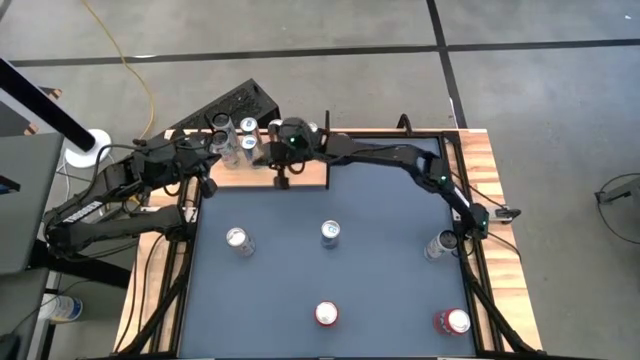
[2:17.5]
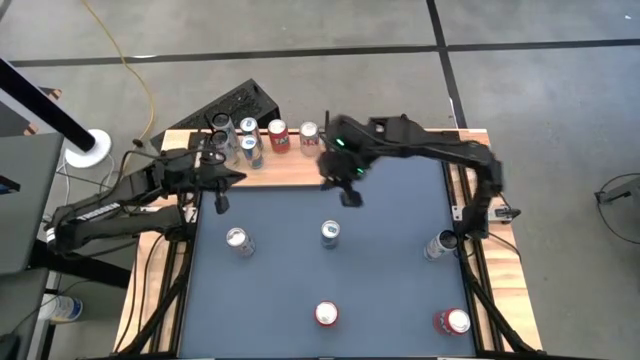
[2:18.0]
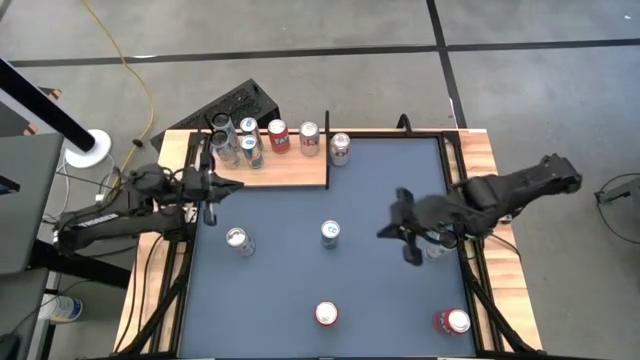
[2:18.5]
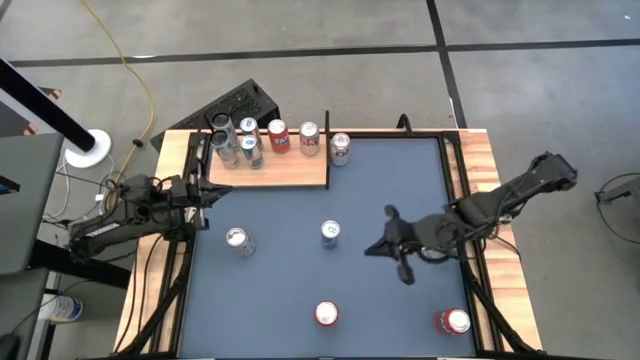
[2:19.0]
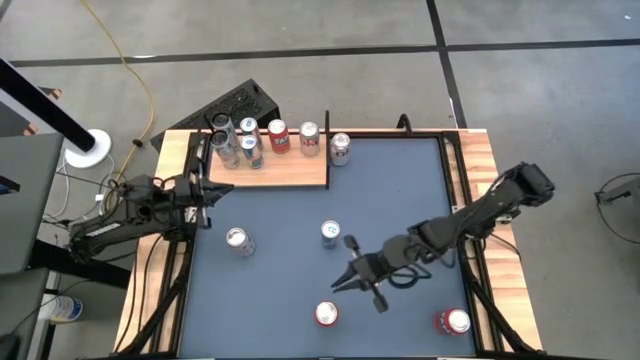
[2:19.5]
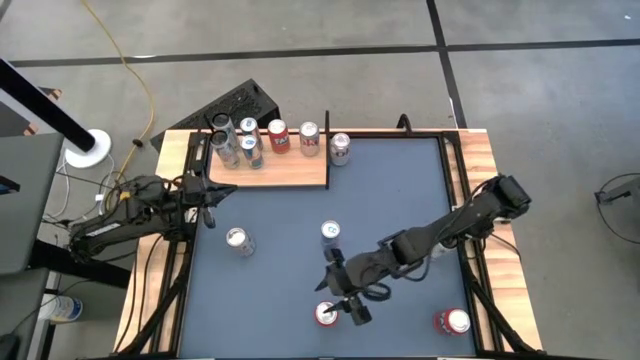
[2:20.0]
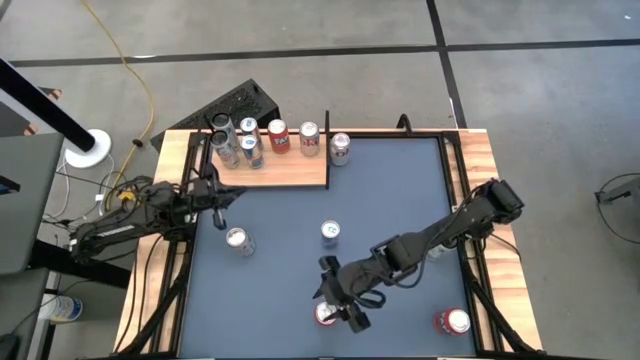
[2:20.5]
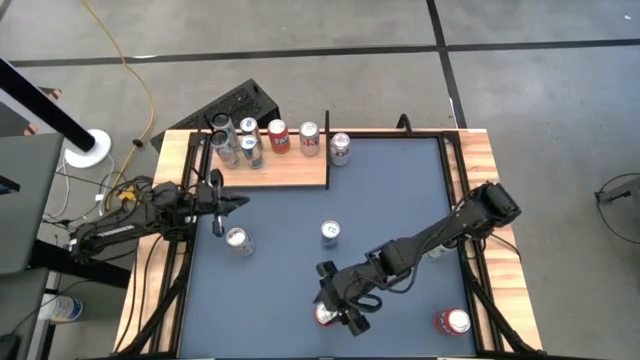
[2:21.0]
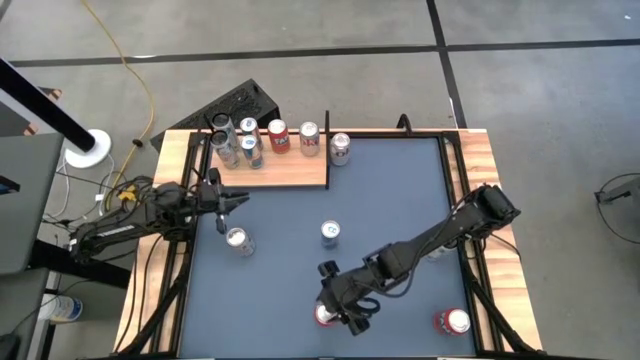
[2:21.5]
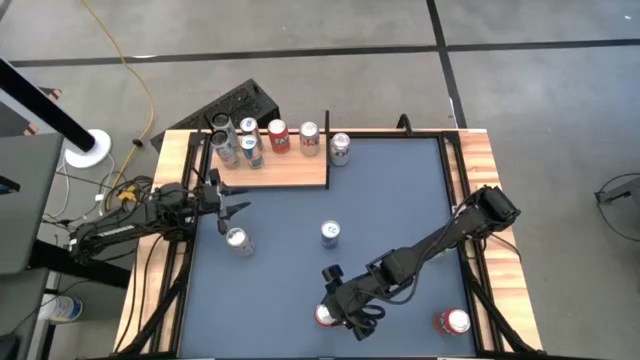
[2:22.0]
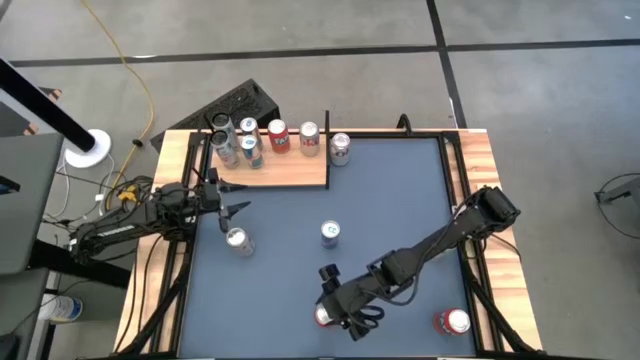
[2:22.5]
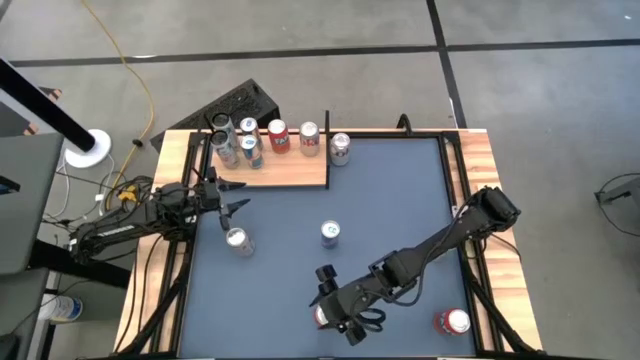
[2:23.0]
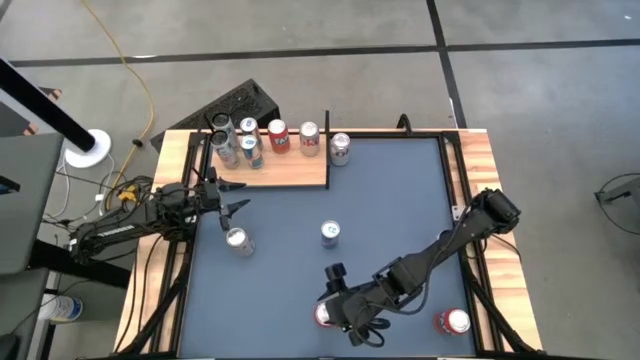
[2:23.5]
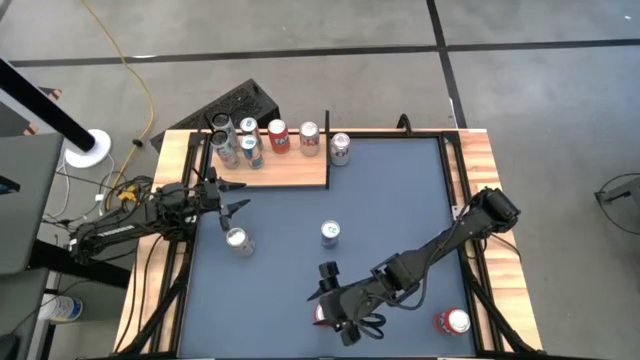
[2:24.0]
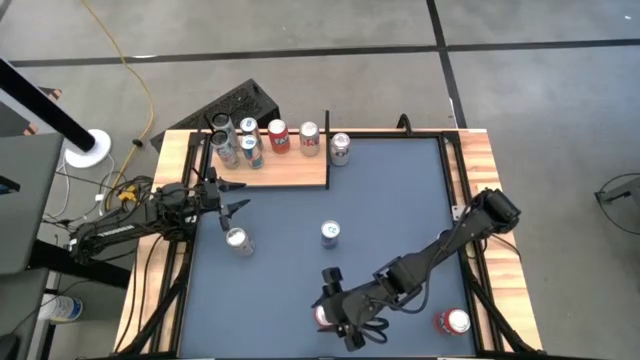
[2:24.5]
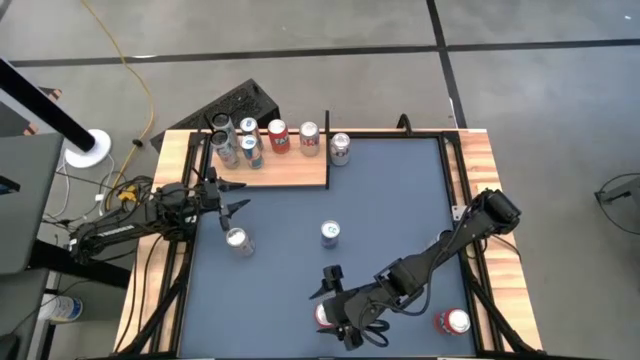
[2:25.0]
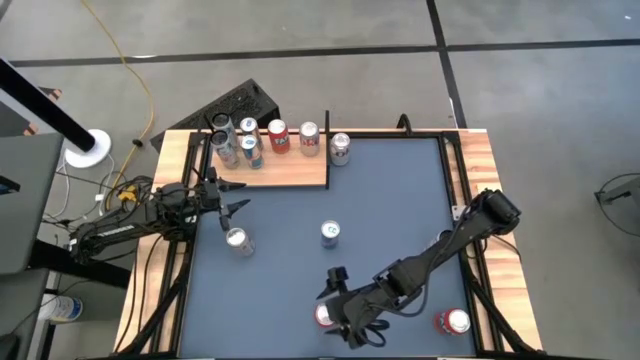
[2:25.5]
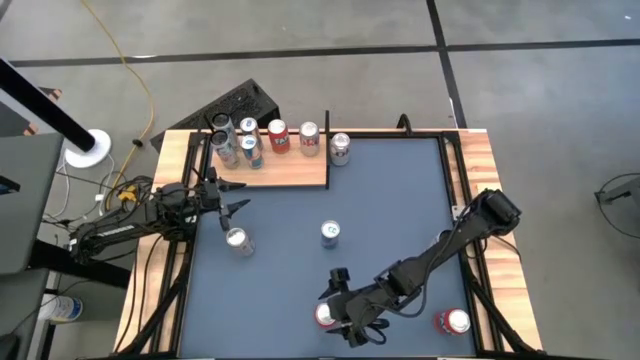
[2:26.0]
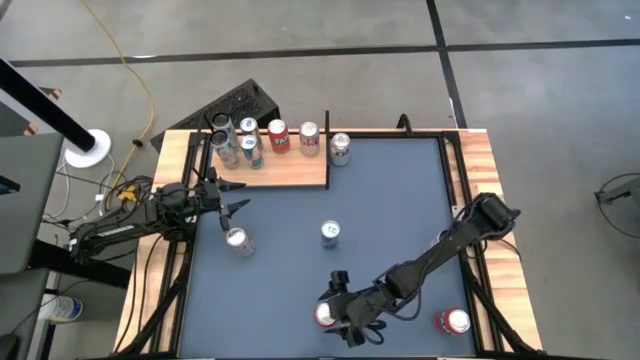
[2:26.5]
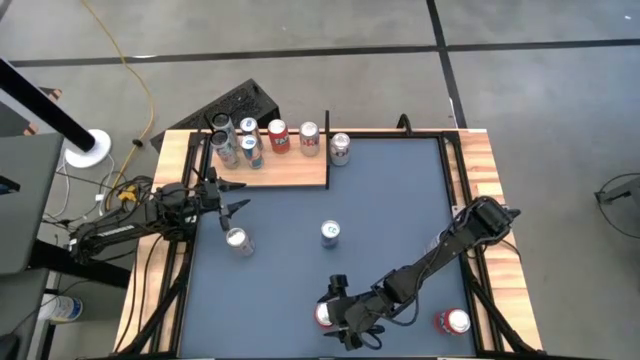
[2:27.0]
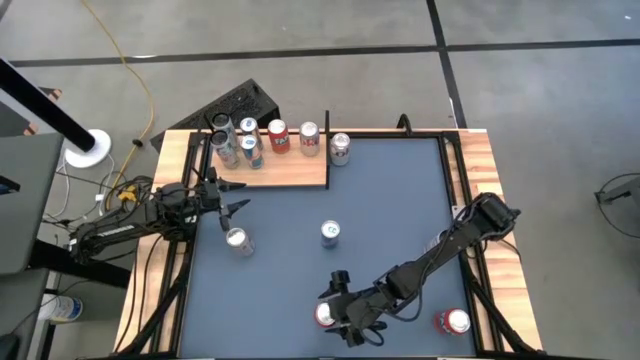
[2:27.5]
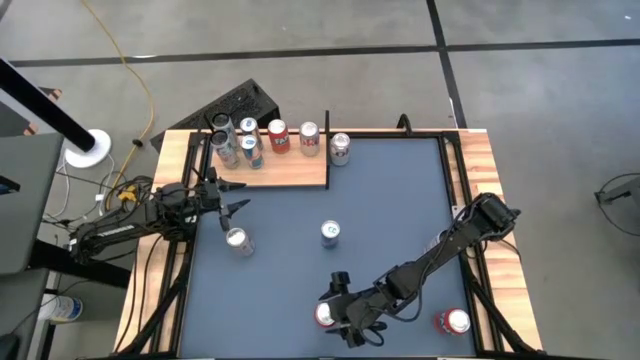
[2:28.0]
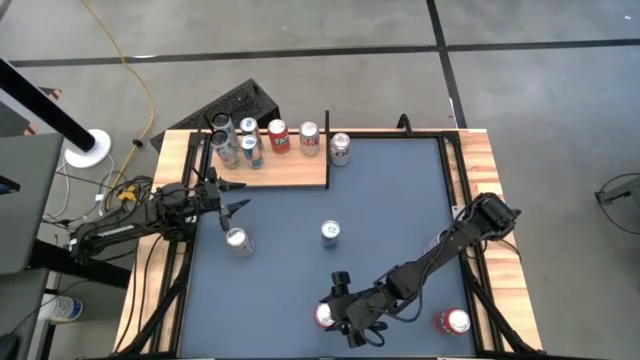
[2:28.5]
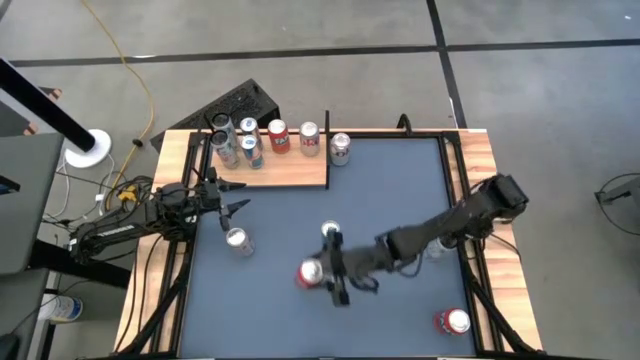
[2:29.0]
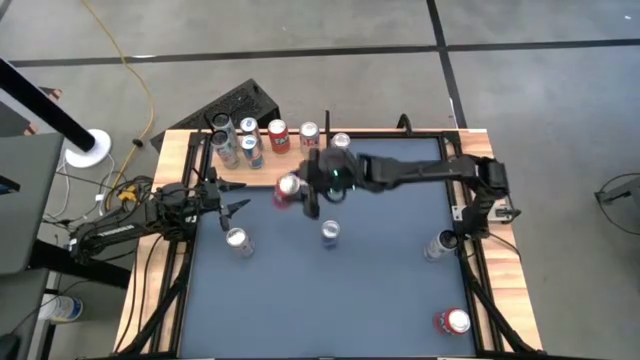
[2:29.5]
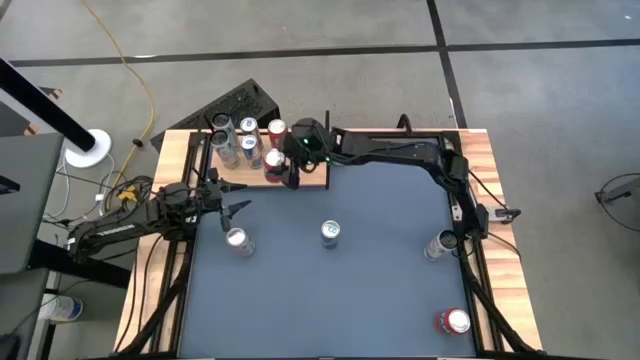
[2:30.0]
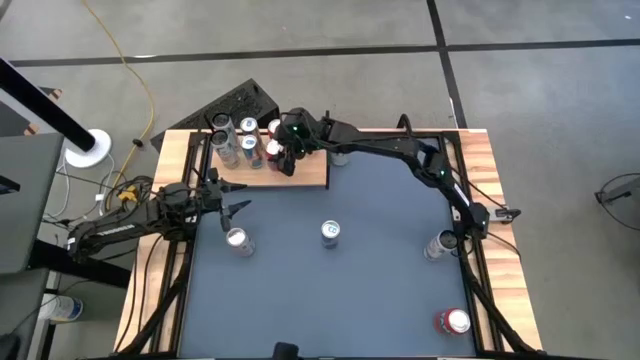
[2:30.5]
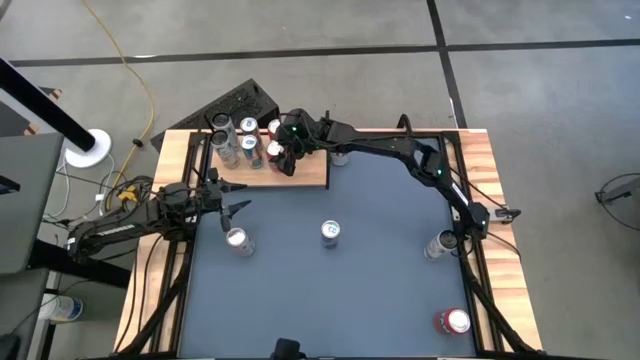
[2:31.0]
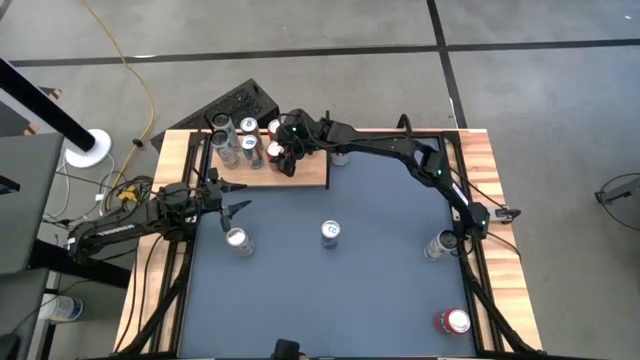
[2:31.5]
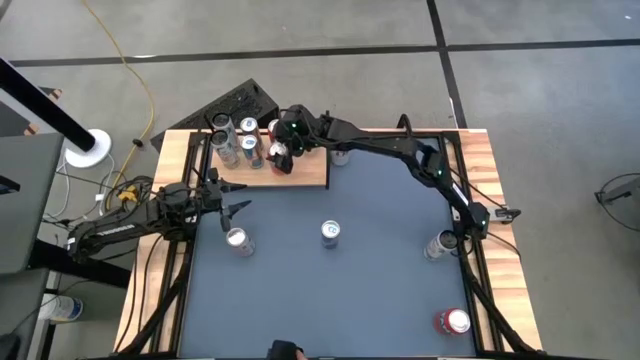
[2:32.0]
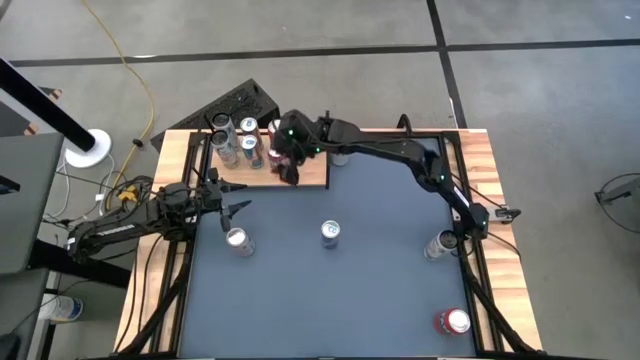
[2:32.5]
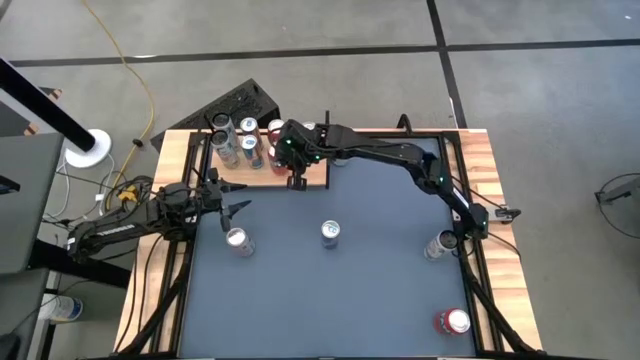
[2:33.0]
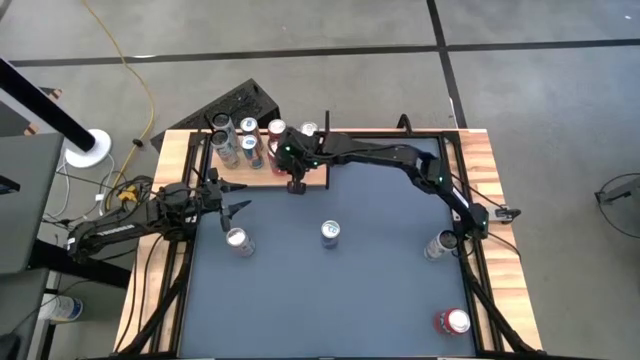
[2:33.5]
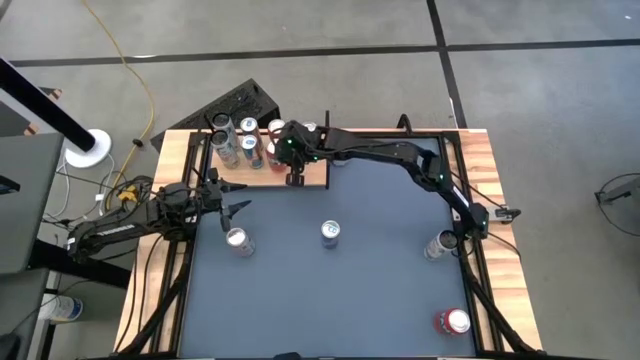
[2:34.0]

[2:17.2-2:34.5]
Task: Place canned beverage on shelf
Put the left red soda can on the shelf aligned with the other red soda can

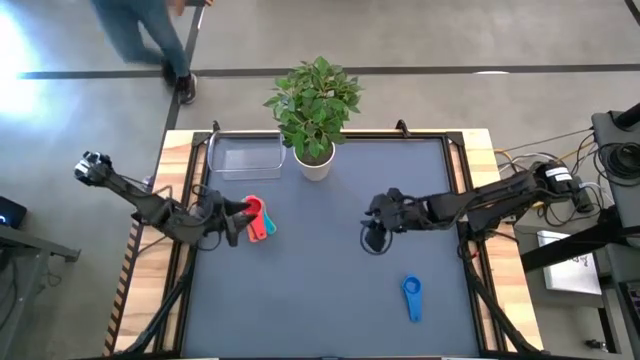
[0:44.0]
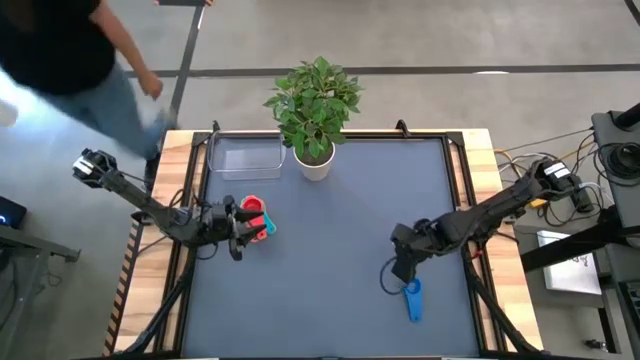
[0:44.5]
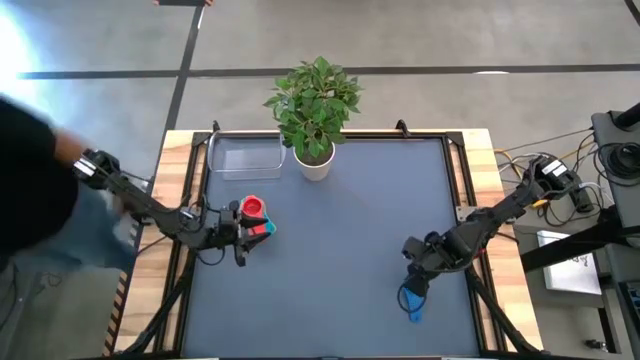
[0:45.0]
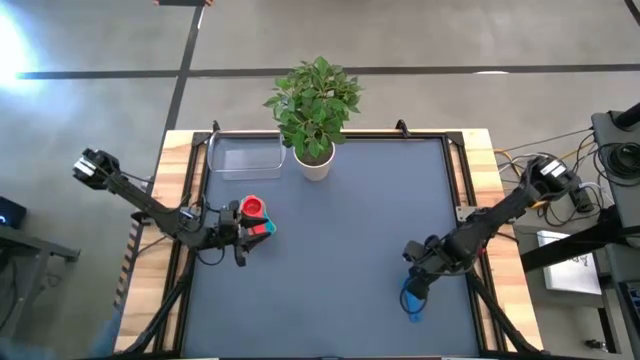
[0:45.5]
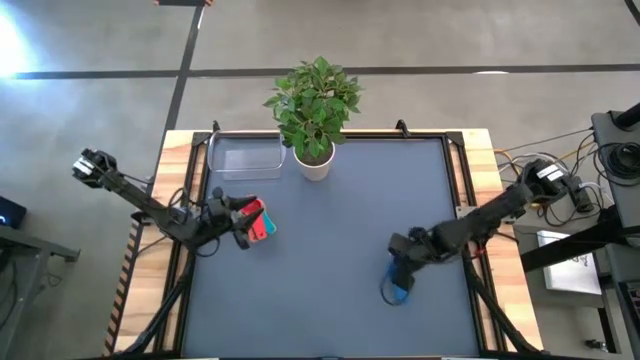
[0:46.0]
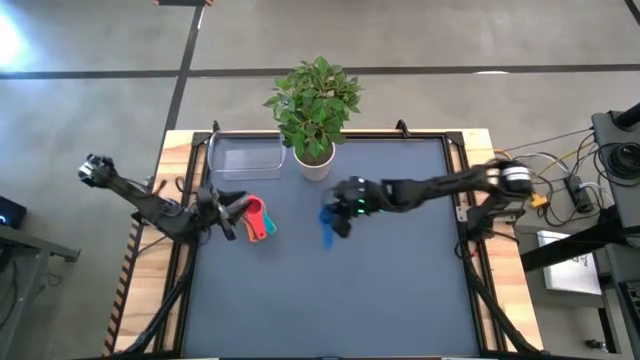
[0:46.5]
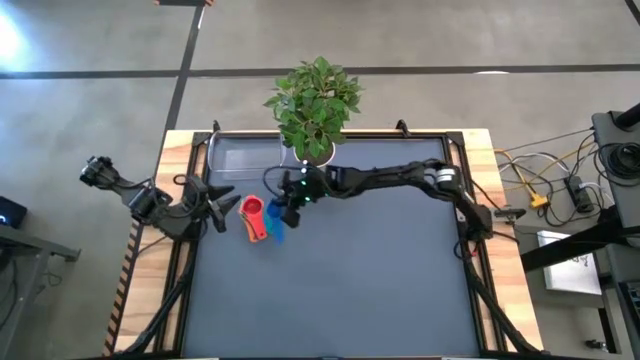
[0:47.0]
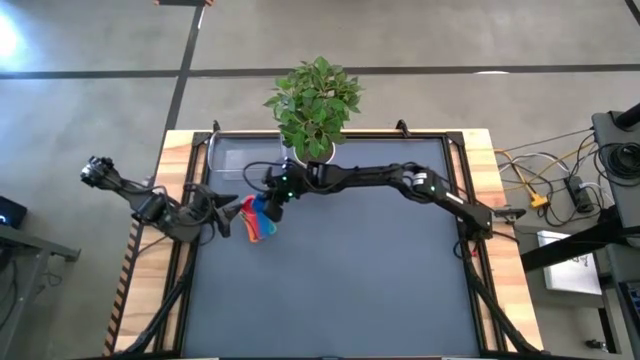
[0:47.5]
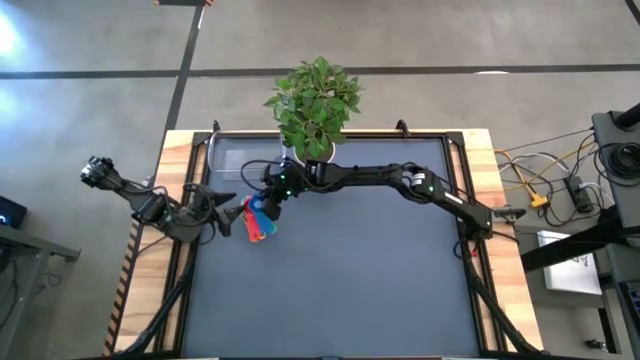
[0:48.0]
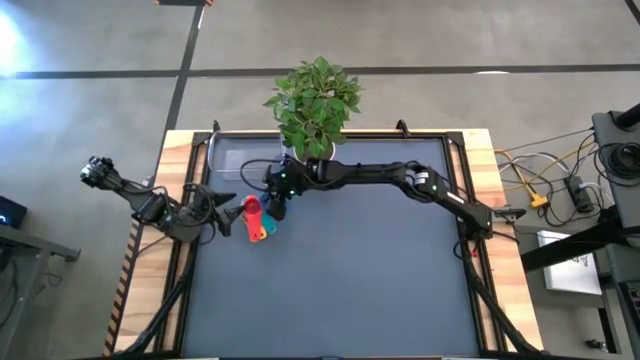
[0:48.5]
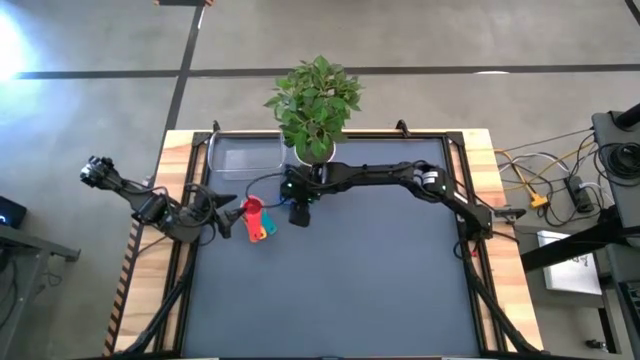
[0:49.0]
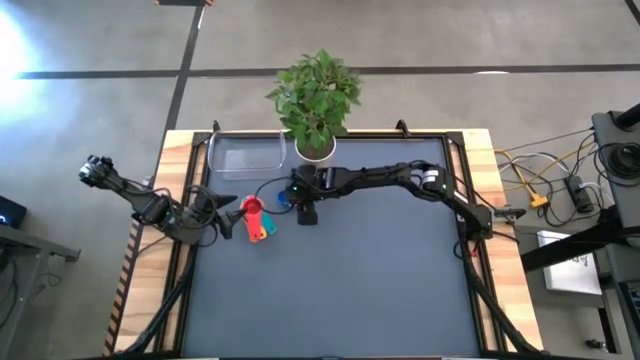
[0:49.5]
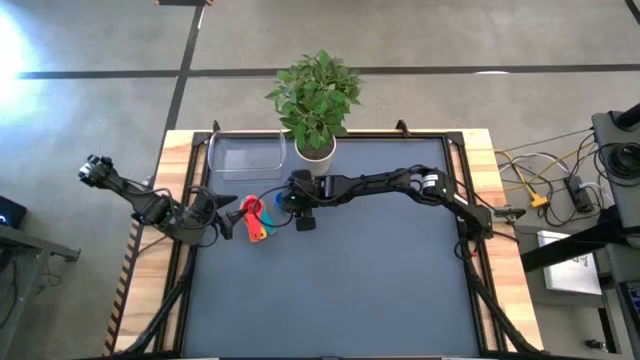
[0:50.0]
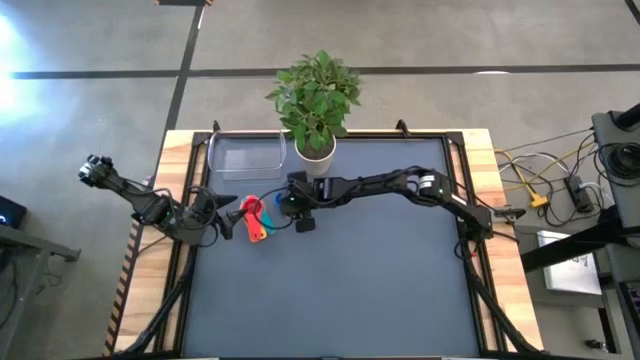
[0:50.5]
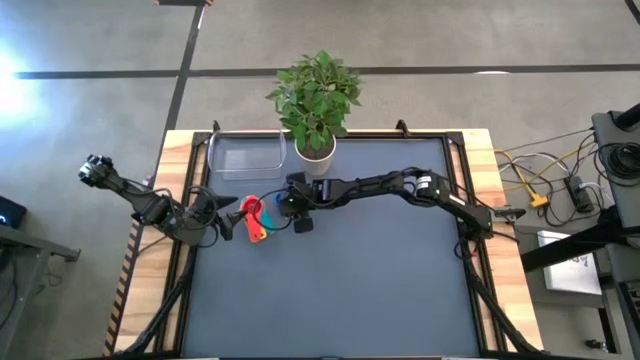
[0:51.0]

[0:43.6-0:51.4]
Task: Nest measuring cups in basket
Stack the blue measuring cup on top of the red measuring cup
